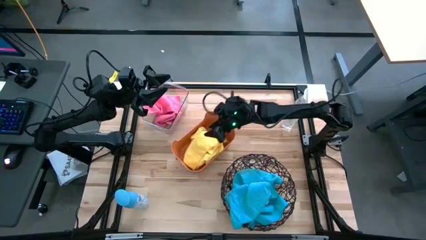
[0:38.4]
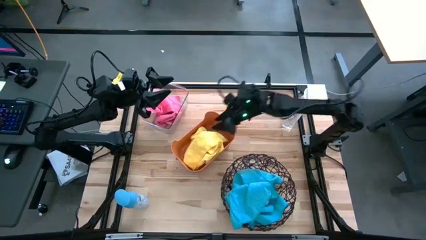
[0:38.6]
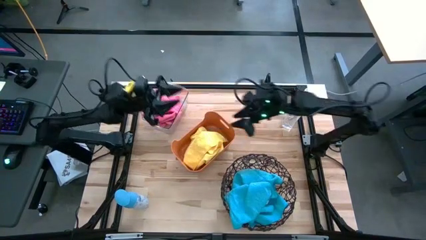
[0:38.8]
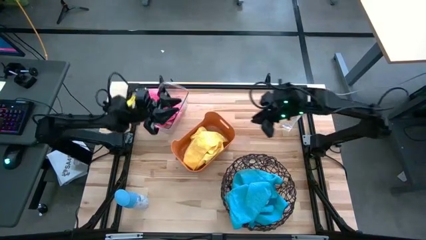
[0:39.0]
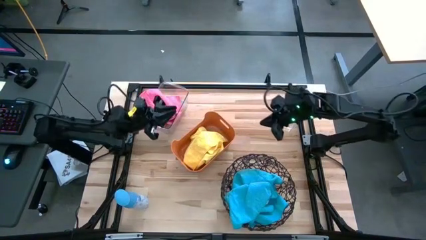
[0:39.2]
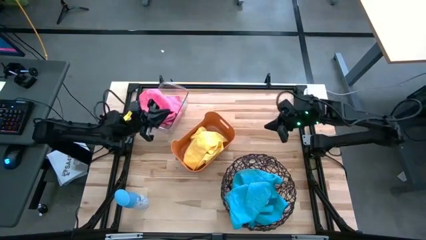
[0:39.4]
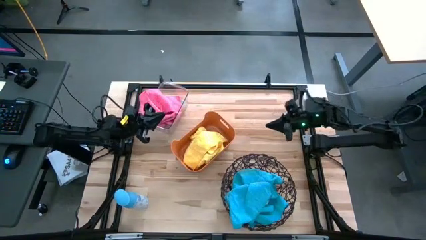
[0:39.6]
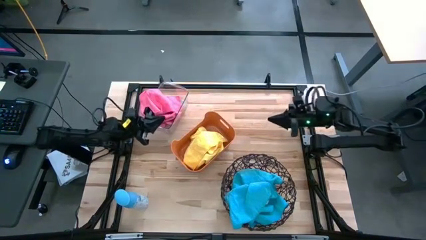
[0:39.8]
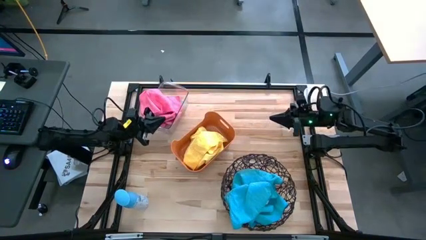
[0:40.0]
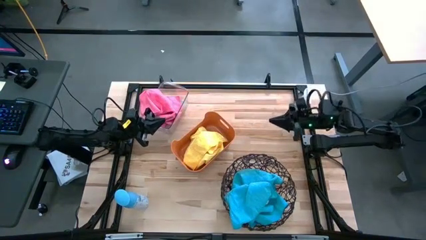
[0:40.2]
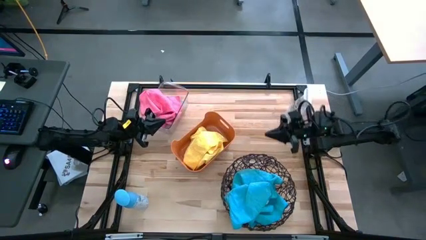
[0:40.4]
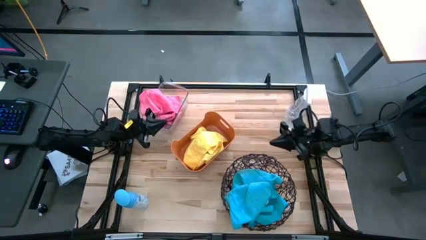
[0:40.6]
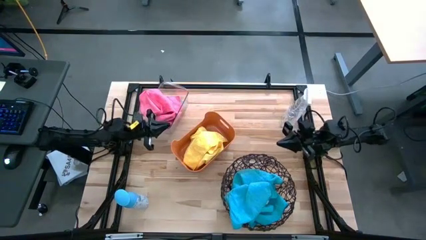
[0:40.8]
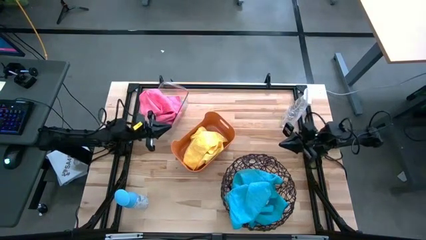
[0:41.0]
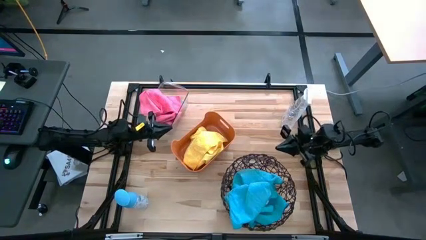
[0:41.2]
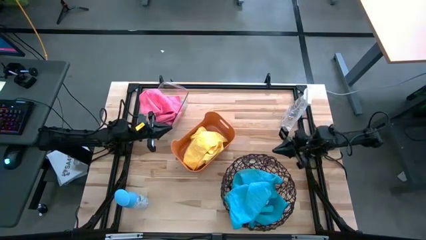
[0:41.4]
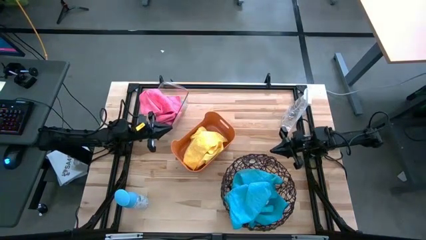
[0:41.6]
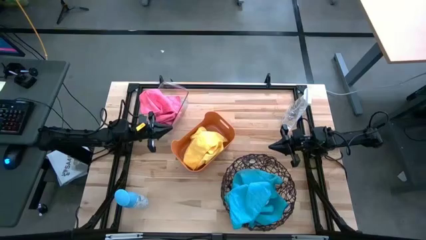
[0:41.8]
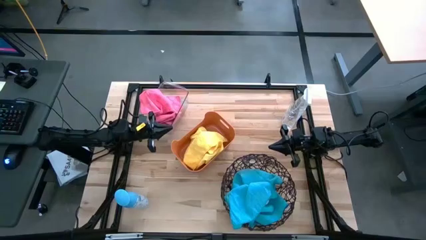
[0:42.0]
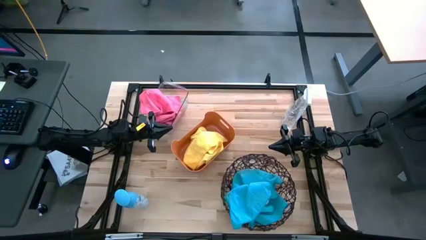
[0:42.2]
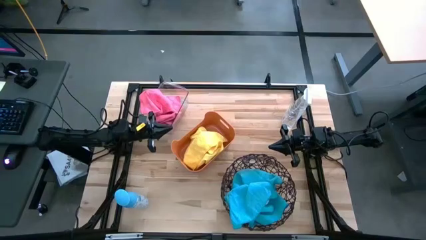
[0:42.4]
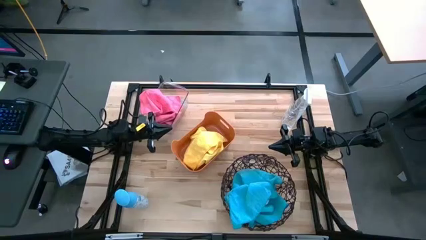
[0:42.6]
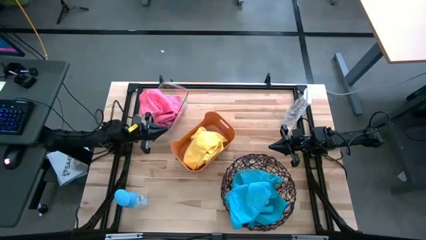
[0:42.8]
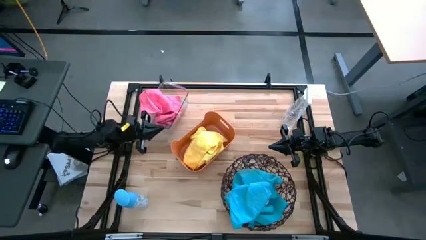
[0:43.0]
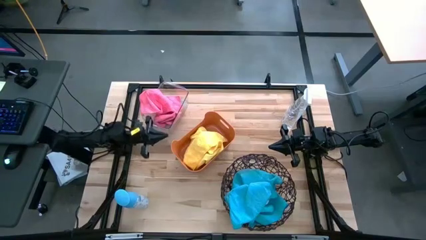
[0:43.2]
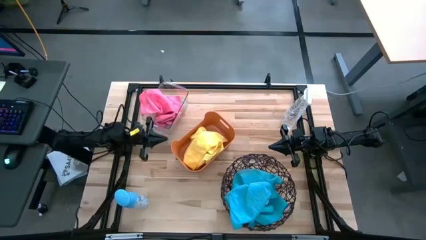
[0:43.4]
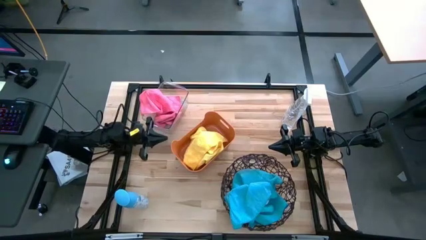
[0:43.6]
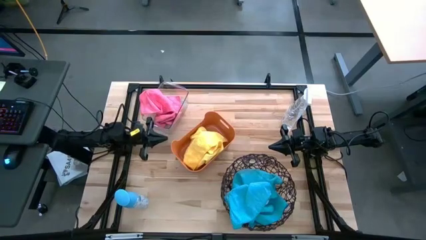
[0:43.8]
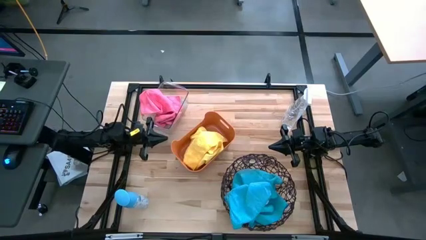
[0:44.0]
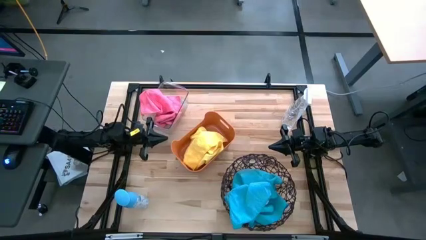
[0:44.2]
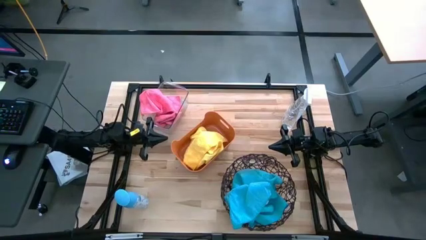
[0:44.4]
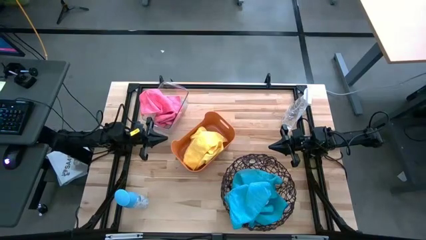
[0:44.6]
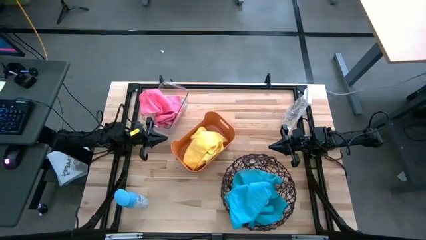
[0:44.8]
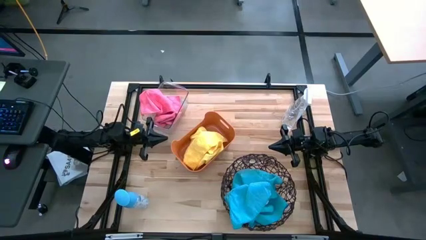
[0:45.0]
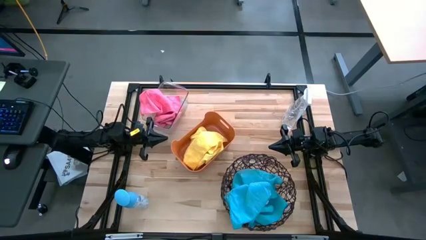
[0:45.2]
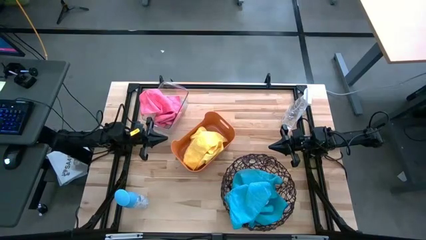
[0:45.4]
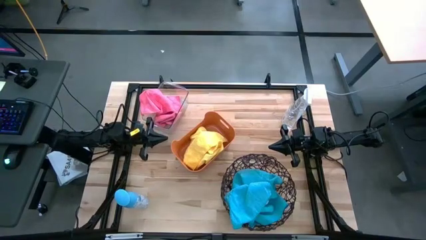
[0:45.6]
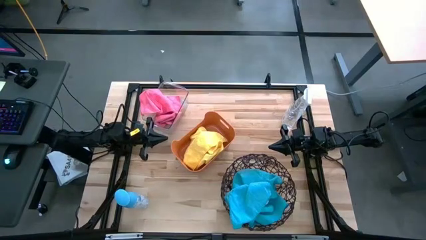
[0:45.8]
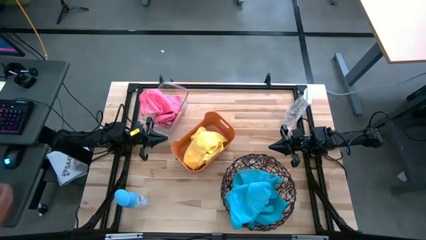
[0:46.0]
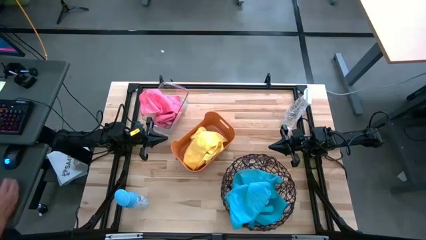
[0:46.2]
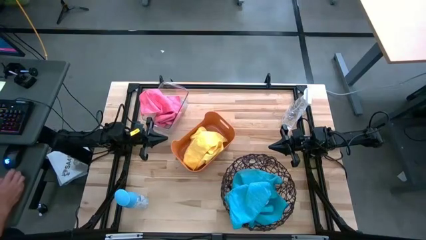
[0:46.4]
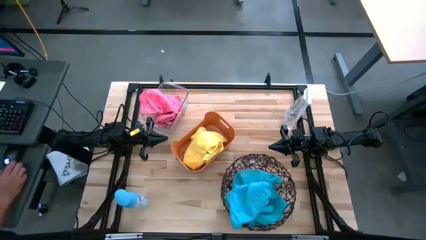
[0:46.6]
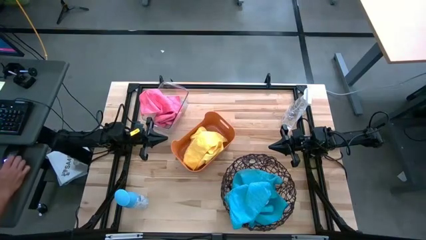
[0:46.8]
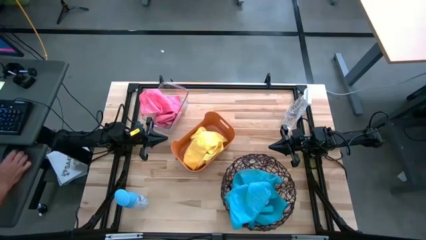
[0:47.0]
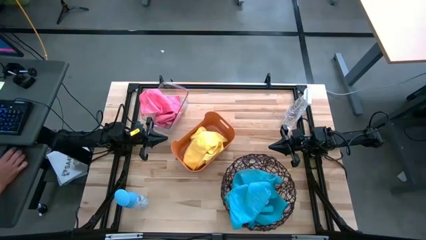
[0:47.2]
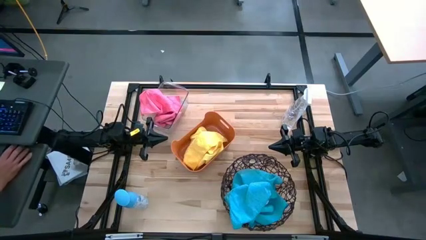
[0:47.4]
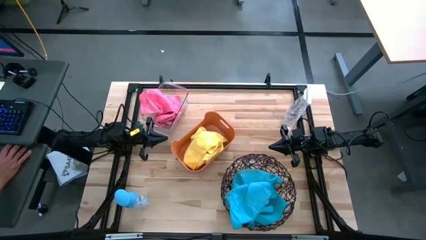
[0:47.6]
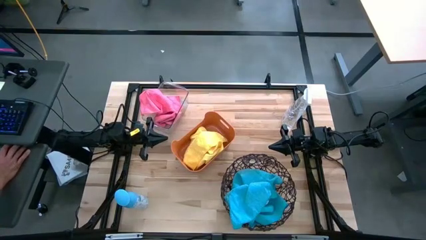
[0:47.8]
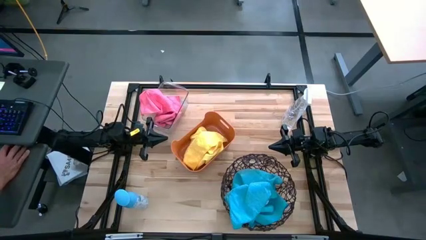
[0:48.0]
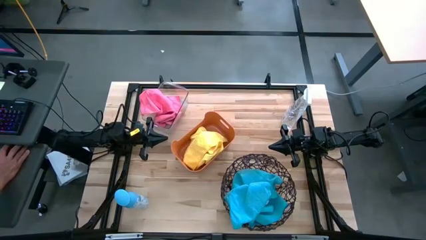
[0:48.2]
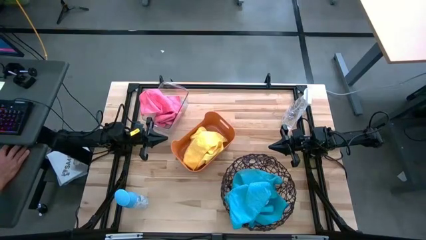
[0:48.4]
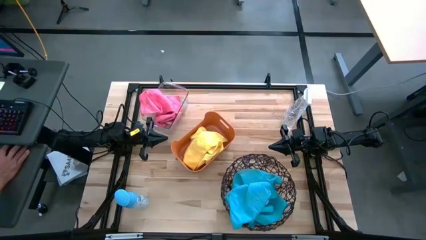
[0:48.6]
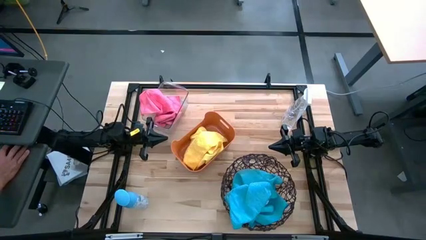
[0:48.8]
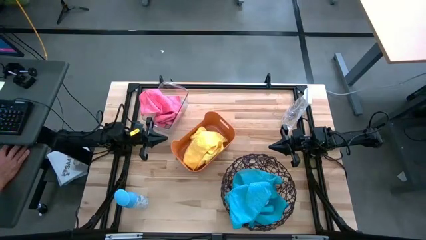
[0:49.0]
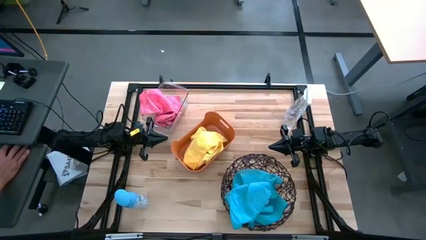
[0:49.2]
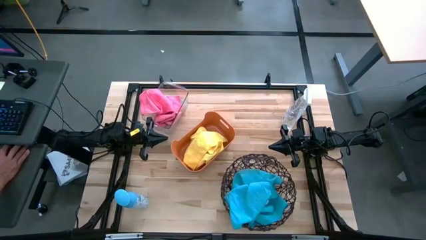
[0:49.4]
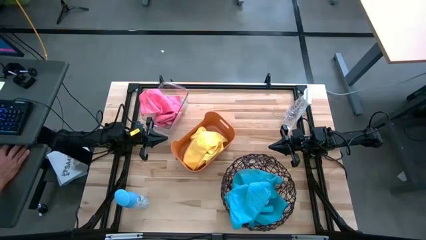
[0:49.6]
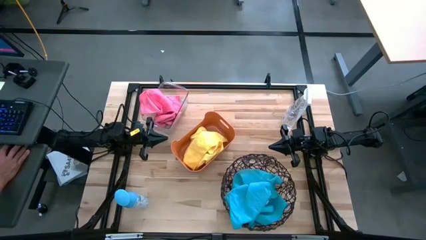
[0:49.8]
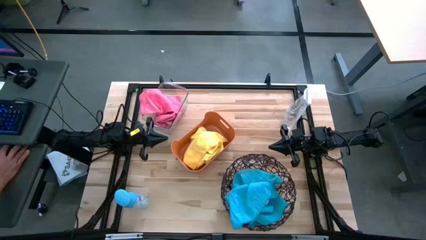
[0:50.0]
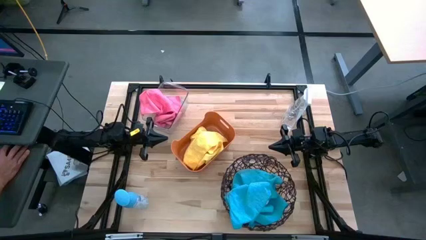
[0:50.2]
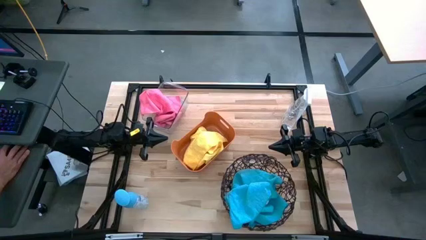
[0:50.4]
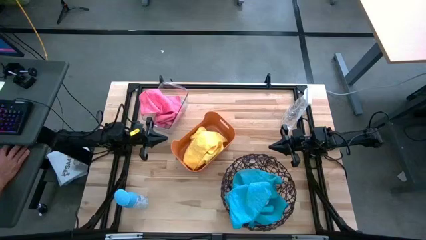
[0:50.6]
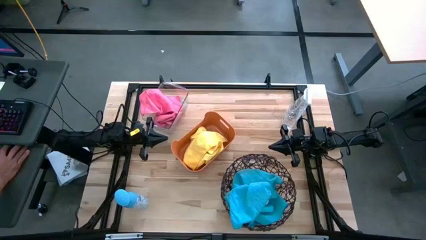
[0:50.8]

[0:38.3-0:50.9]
Task: Sort microfiber towel by color & place in baskets
Return to Home Position
